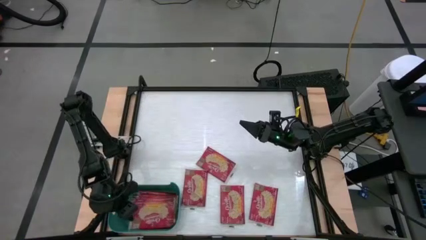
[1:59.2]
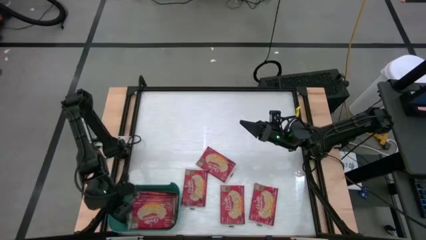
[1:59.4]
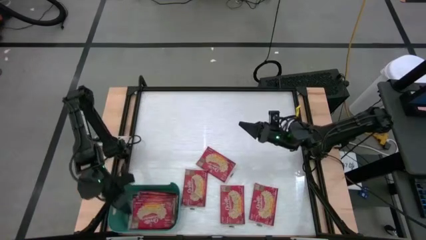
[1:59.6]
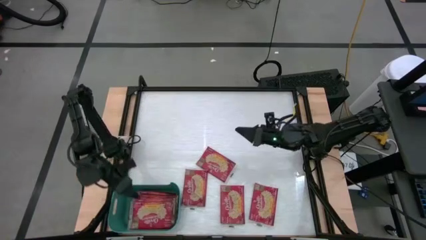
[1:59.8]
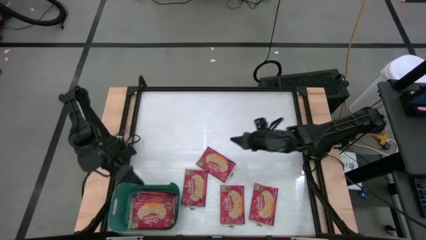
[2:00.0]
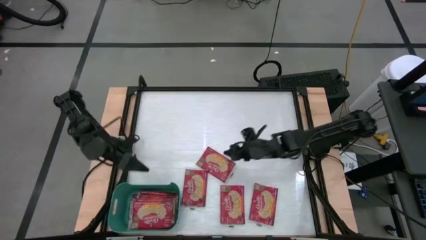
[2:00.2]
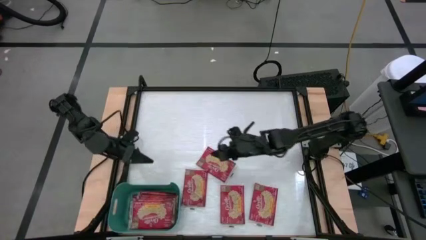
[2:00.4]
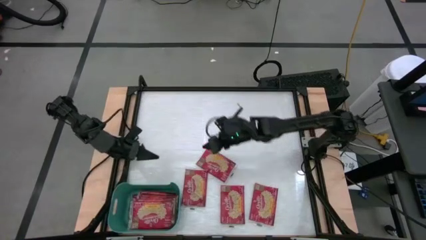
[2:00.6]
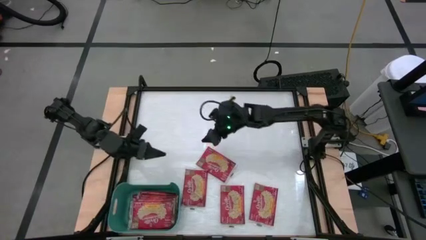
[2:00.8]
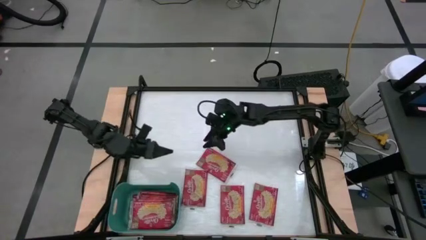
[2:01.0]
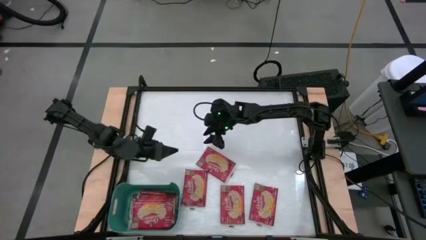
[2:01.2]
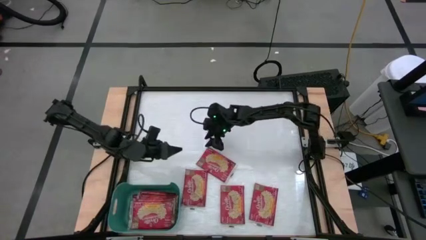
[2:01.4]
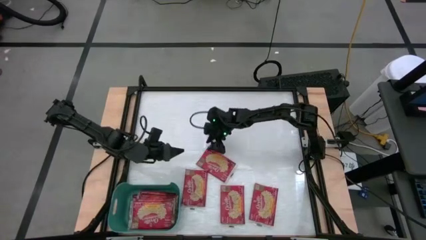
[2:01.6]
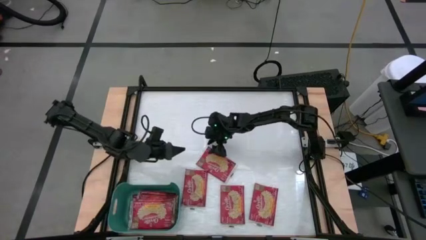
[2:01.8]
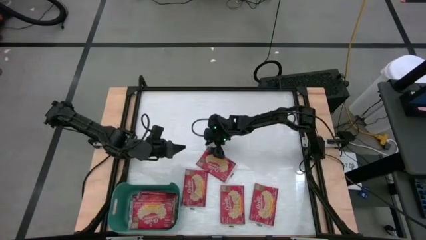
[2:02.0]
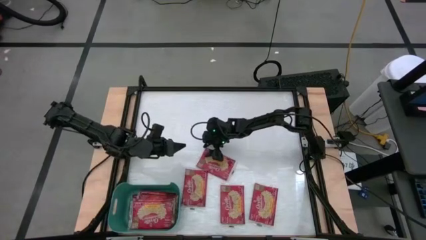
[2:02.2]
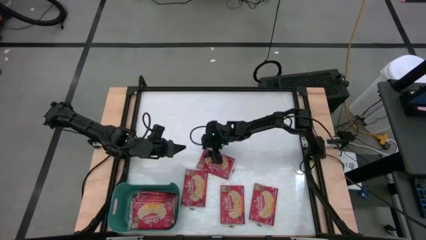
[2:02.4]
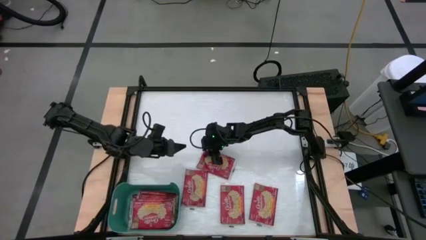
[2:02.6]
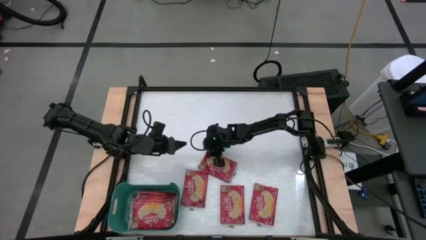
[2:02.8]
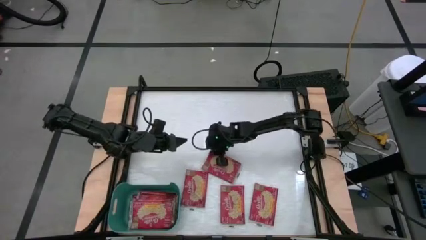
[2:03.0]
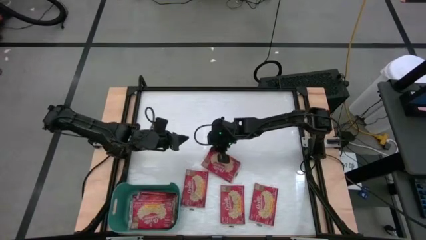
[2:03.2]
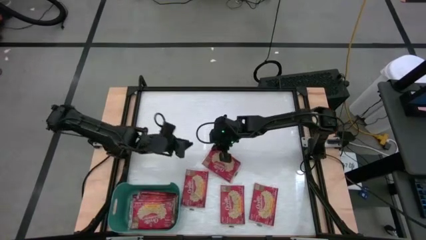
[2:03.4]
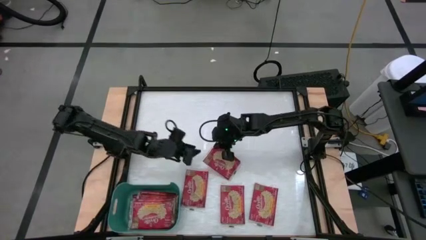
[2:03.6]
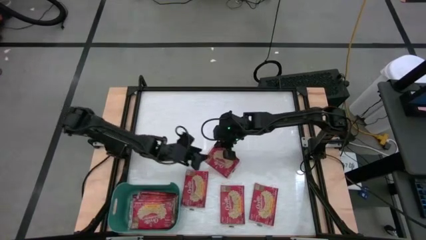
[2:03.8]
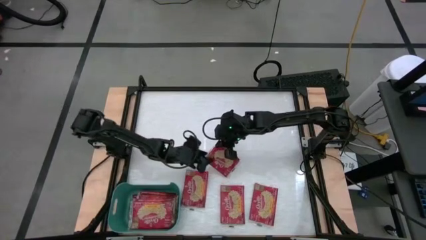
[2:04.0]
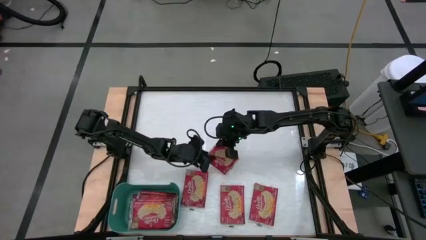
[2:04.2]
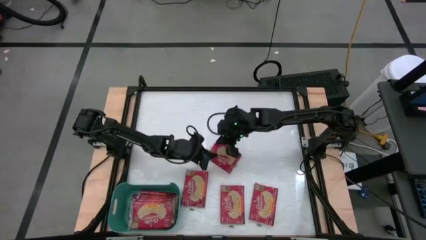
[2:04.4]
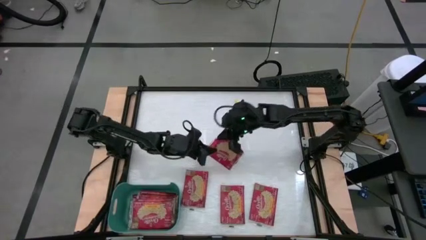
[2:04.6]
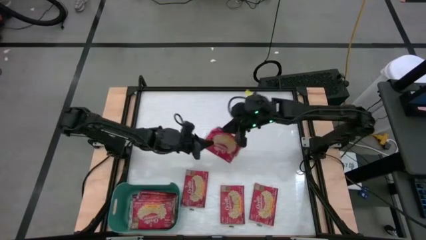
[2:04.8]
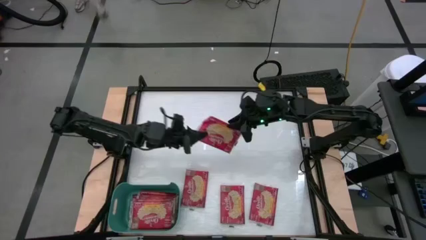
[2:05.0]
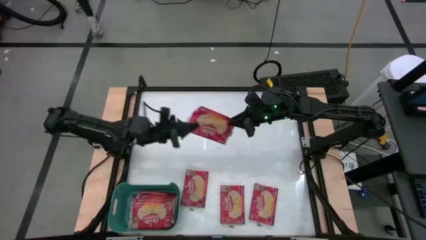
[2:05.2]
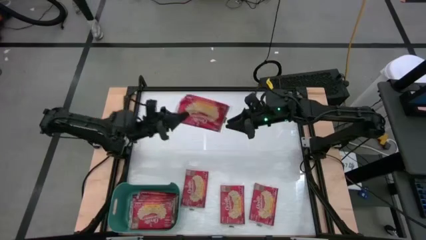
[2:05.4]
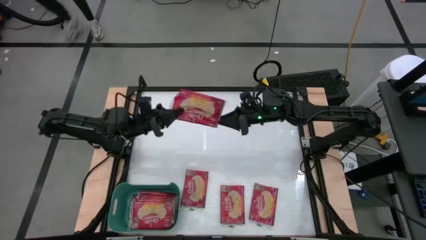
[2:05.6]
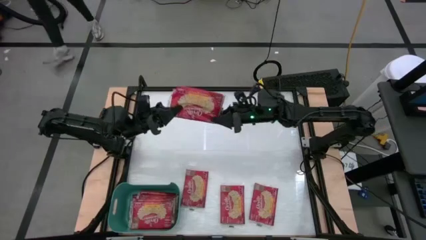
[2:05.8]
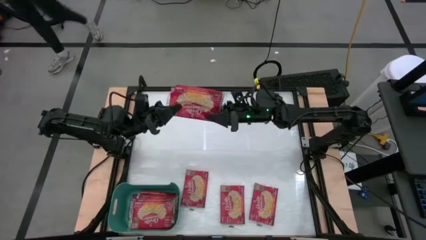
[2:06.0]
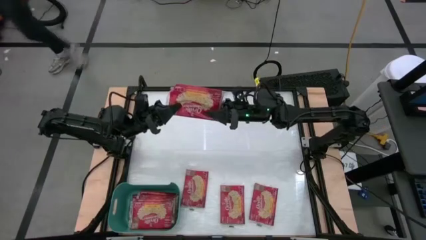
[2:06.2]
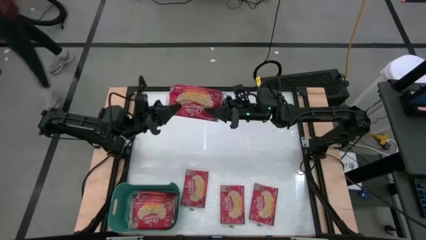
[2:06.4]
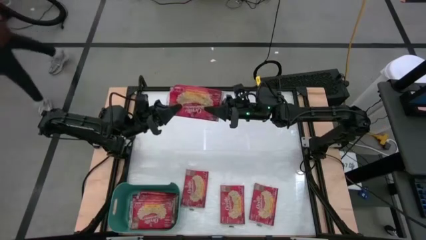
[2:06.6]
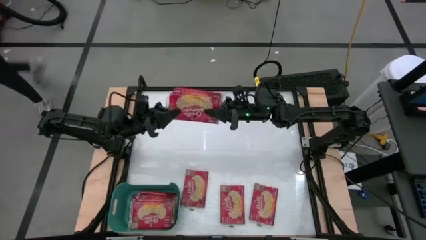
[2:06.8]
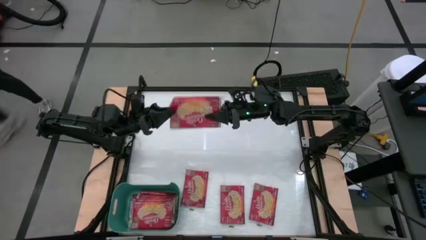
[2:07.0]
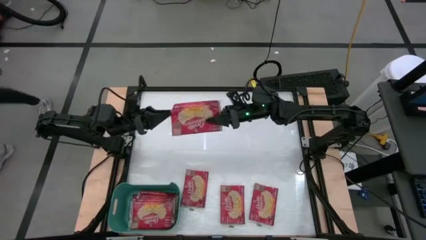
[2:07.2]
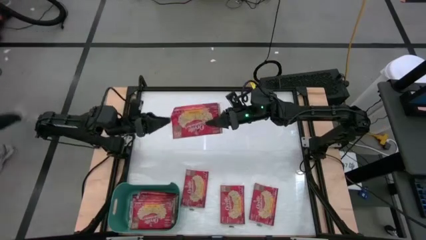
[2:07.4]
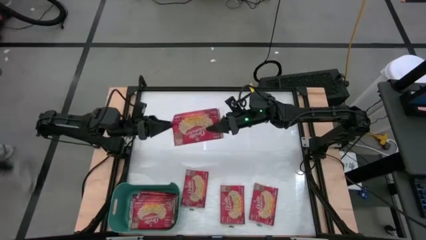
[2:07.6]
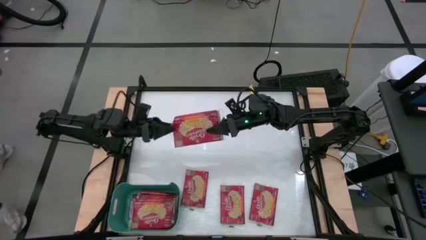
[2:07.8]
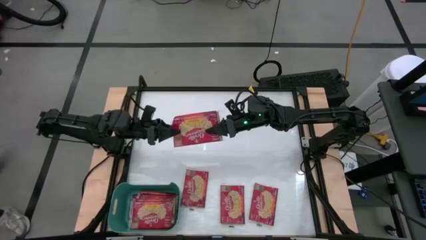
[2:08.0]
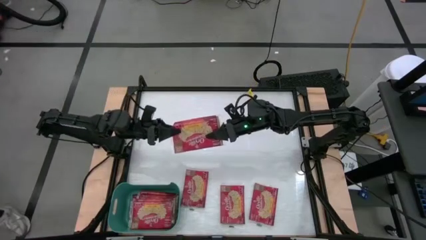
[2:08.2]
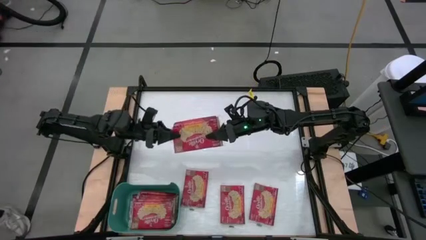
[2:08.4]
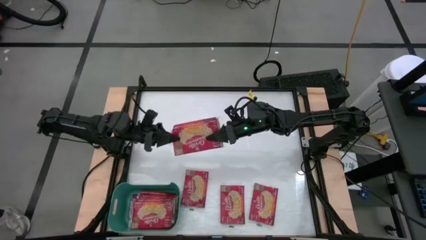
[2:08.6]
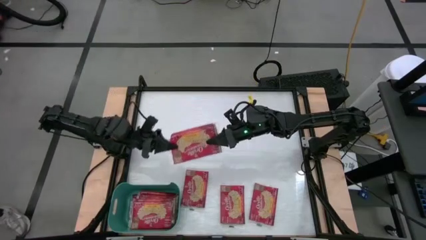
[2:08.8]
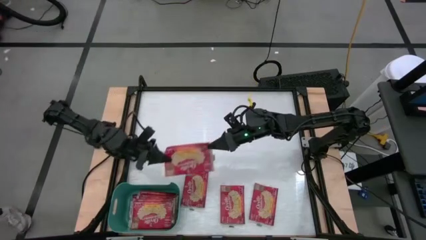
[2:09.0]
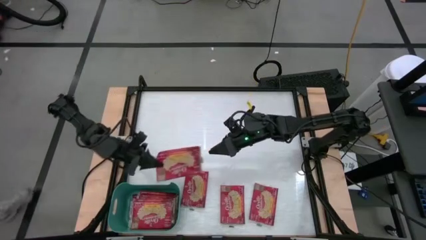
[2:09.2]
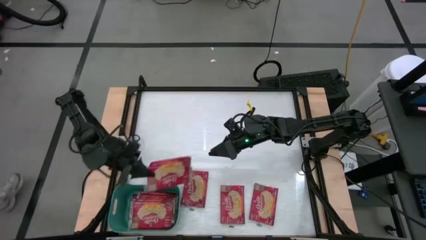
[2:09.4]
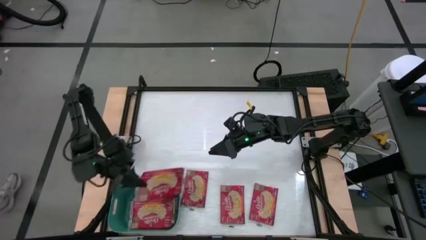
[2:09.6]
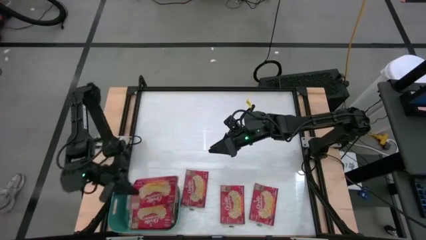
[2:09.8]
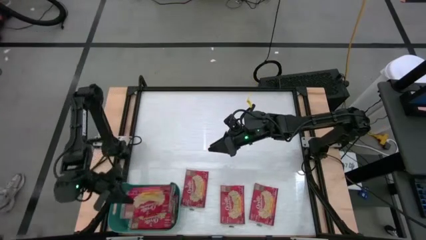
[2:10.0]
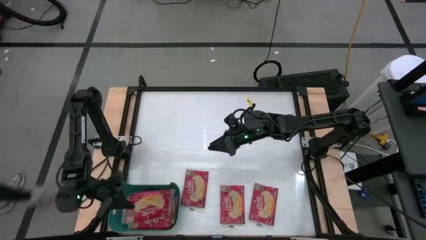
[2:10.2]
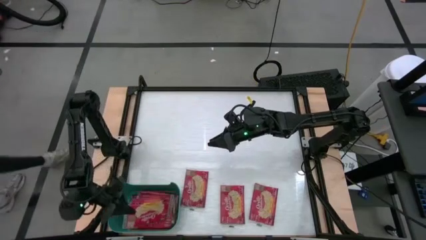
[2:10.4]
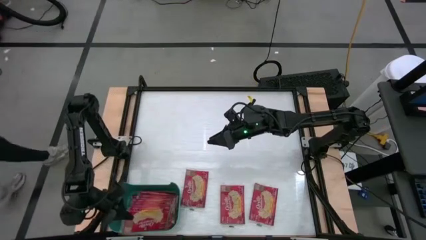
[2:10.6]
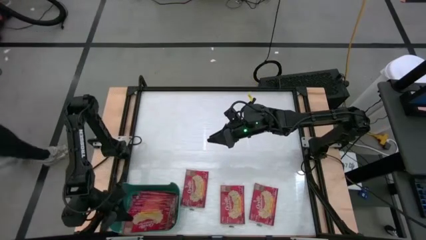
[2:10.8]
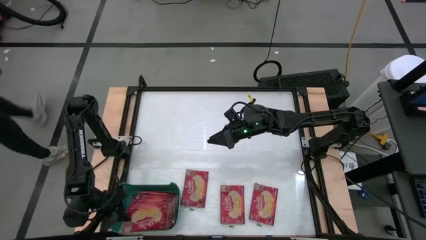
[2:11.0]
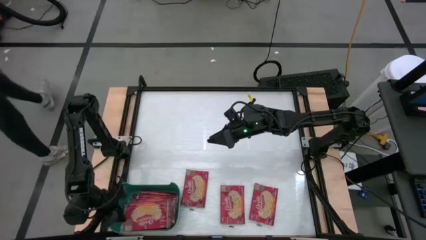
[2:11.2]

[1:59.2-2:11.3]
Task: Sort popcorn bags into baskets
Put the red popcorn bag into the green bin
